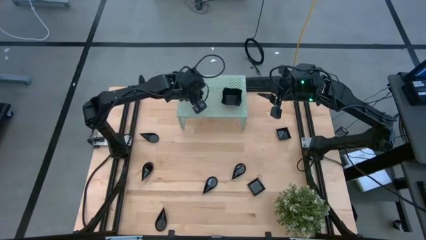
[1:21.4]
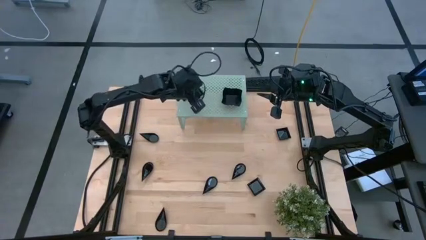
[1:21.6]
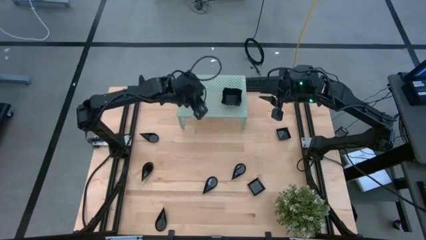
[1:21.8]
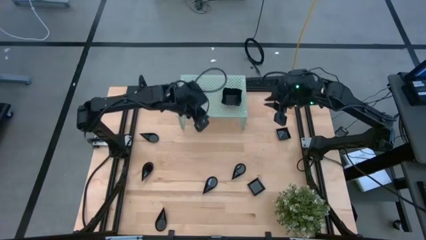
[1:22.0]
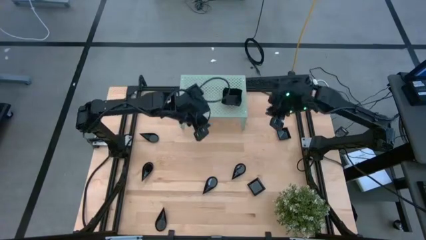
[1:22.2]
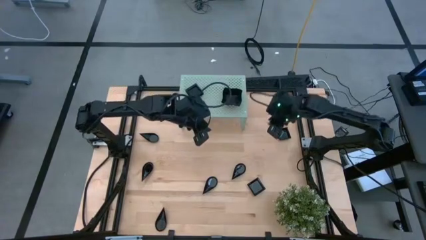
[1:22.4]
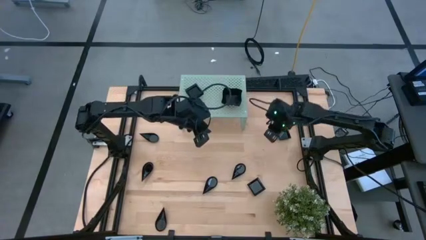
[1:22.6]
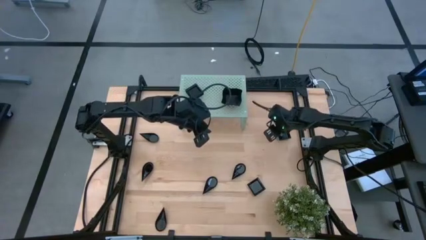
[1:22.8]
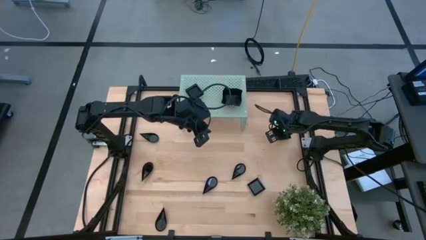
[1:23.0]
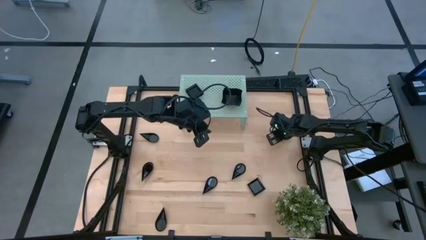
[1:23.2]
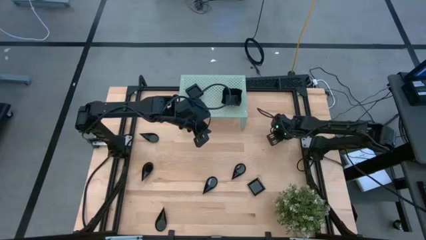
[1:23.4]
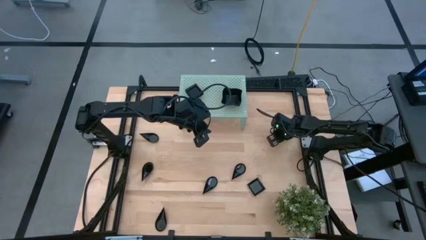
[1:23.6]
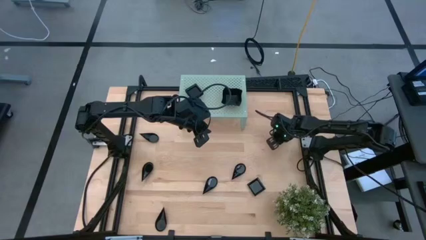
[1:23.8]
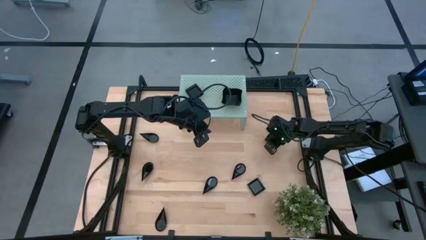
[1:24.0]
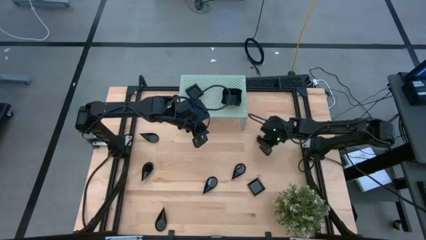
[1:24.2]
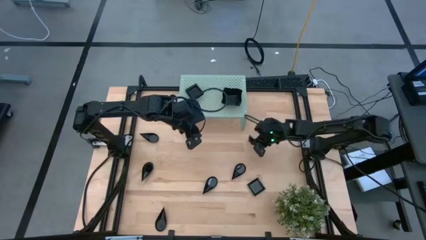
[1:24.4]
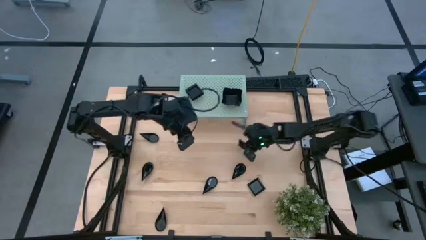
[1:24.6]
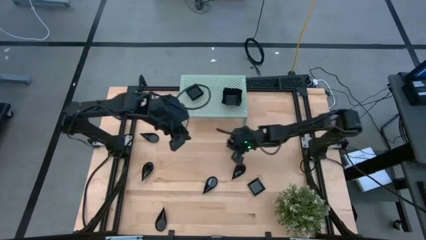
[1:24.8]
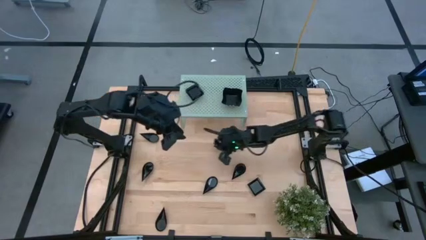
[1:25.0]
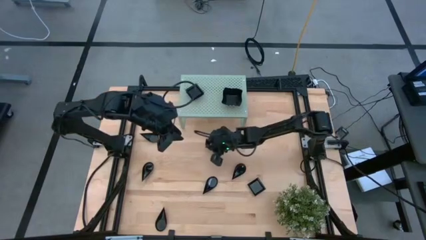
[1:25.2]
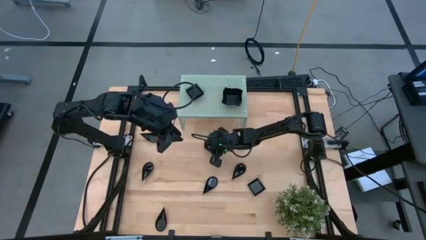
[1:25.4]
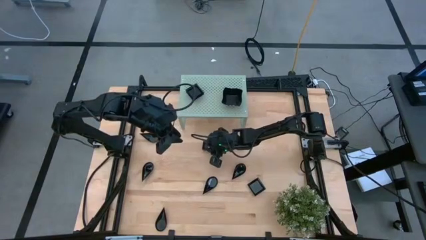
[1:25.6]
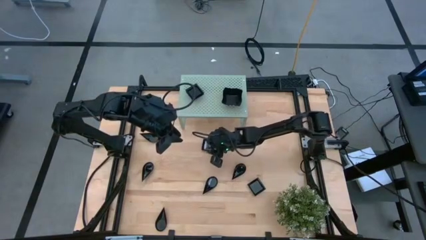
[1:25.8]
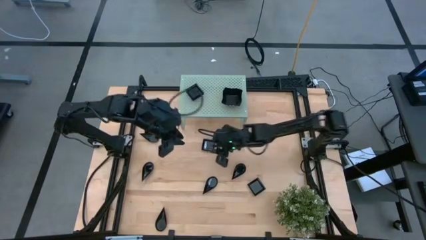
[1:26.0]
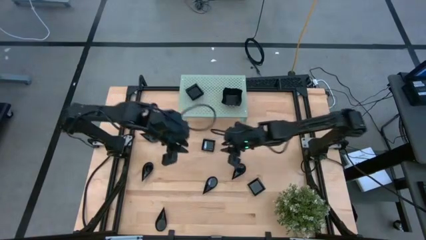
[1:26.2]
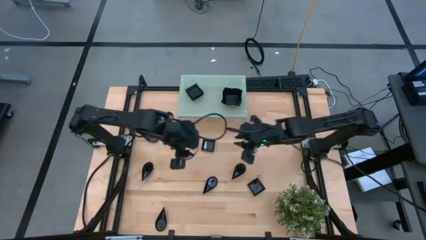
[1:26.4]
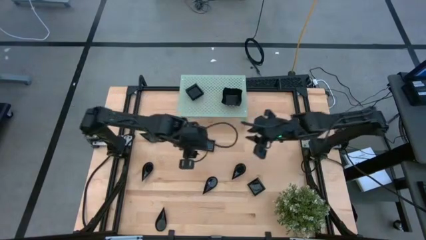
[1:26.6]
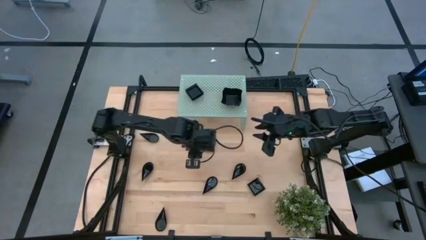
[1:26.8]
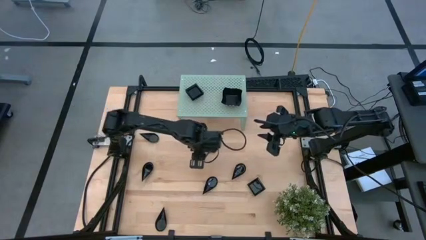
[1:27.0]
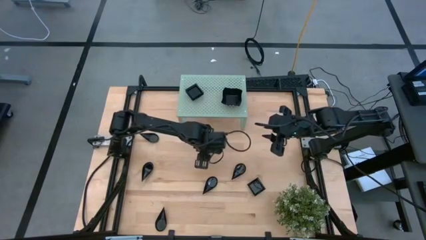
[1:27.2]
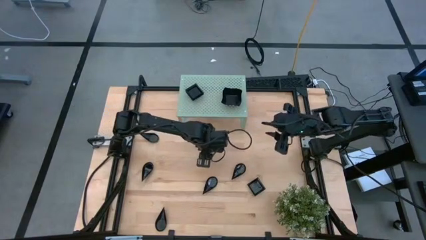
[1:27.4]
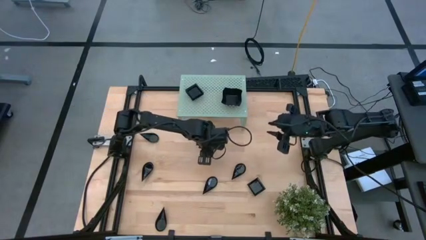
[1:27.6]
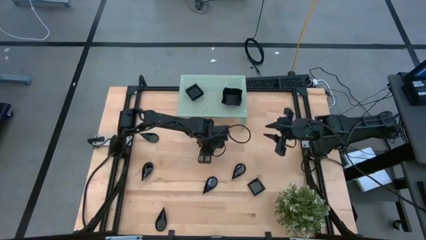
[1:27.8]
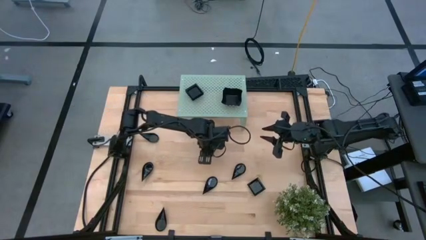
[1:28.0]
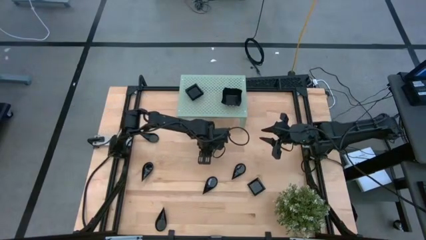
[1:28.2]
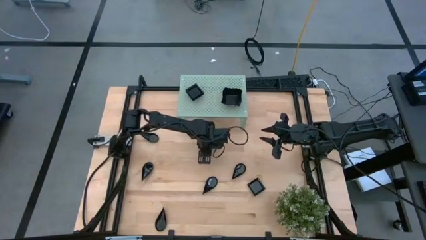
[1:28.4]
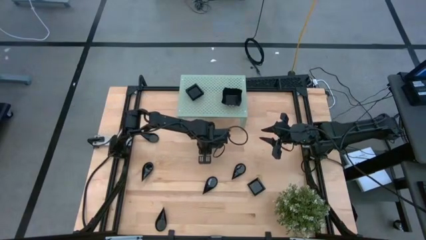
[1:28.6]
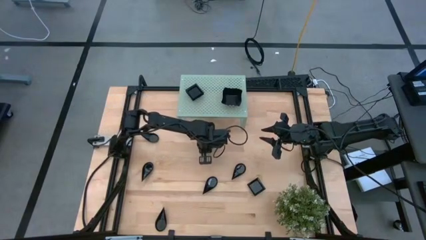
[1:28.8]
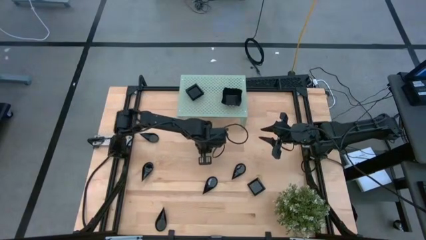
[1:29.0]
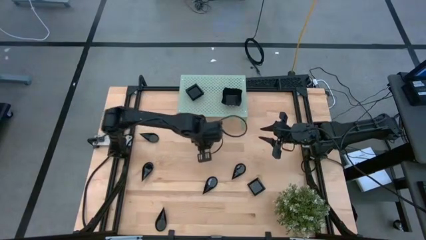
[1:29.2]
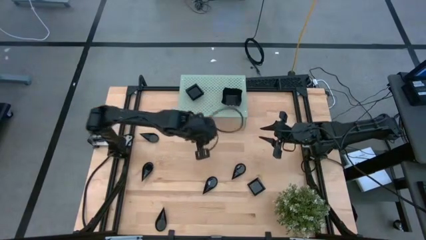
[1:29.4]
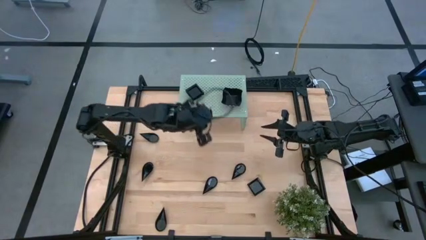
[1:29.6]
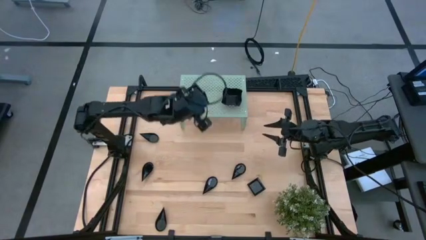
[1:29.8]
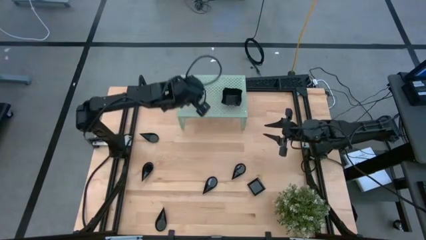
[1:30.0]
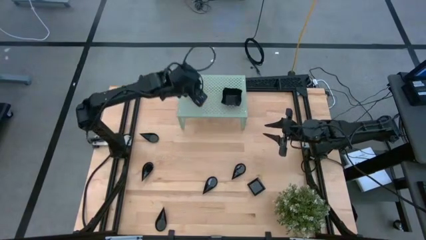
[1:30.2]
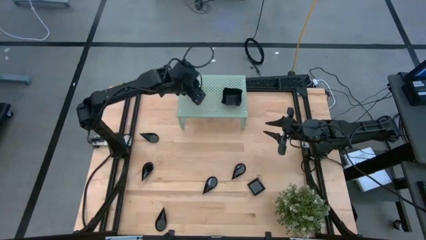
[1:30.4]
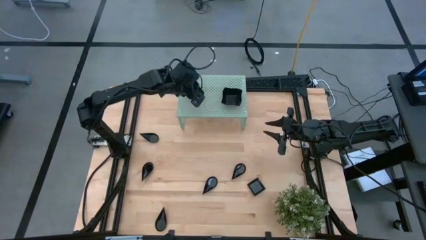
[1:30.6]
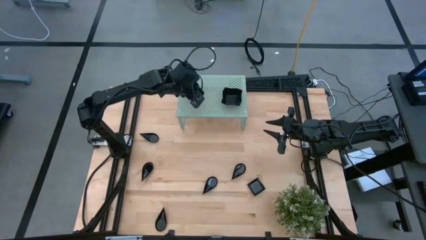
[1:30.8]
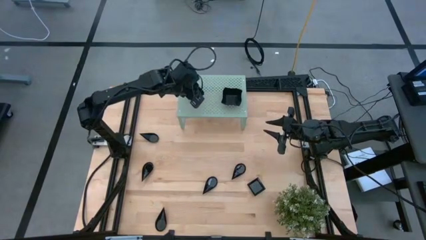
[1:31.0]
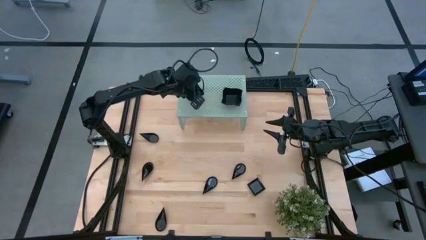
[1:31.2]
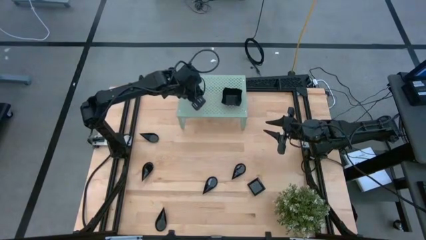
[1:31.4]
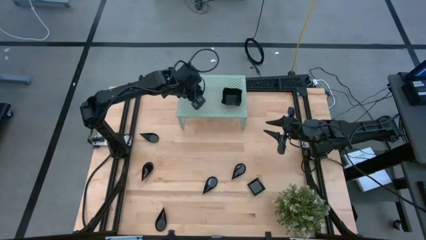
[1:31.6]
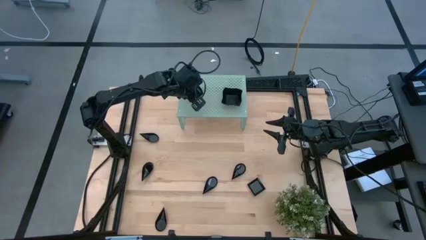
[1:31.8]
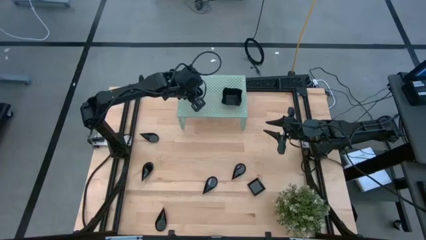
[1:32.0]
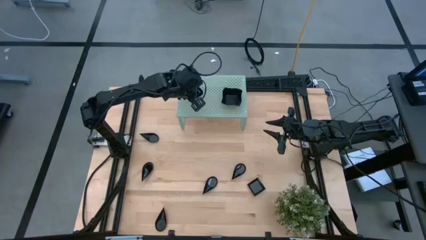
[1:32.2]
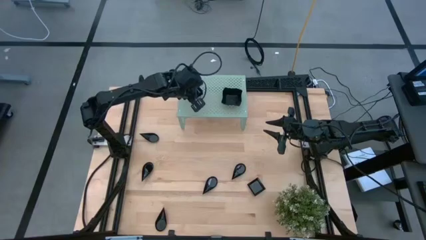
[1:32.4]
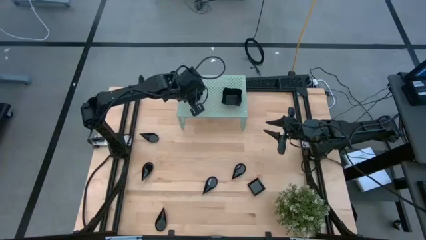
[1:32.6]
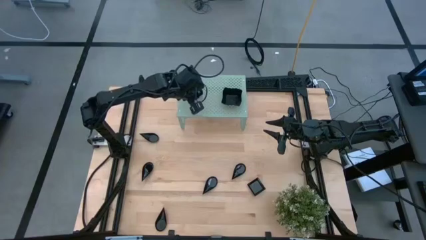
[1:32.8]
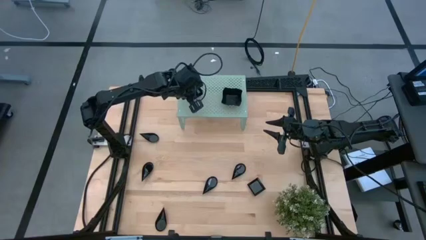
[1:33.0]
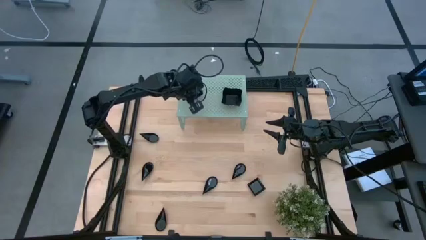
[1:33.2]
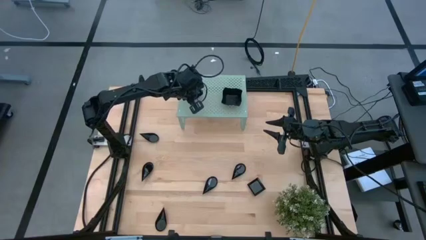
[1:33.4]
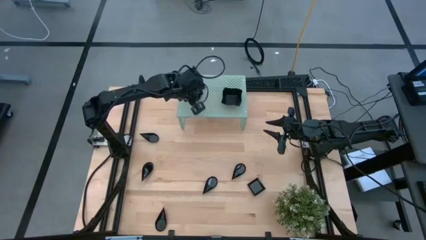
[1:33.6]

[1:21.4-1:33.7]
Task: Pick & Place Mini shaped plates
Stack the black square plate on top of the other black square plate on the shelf
